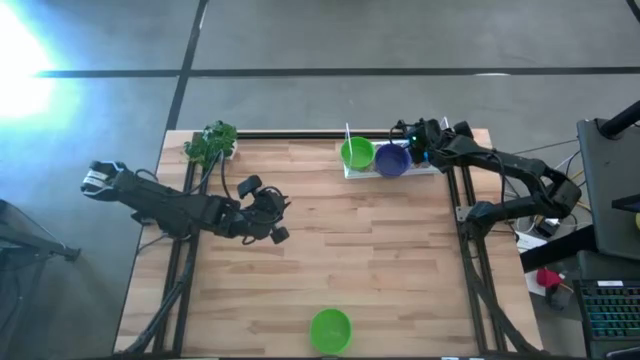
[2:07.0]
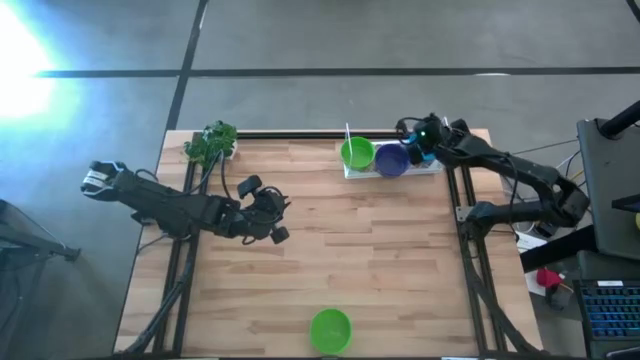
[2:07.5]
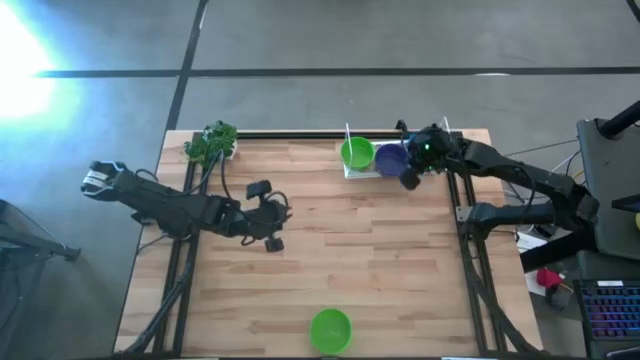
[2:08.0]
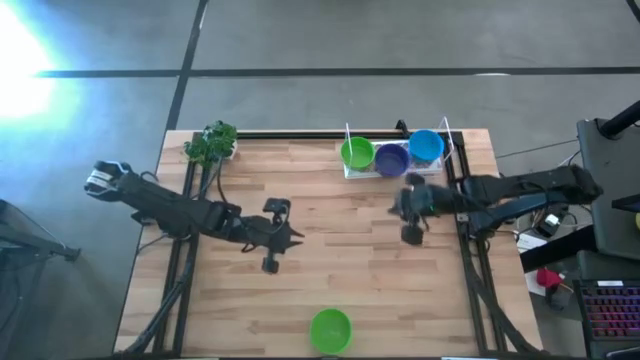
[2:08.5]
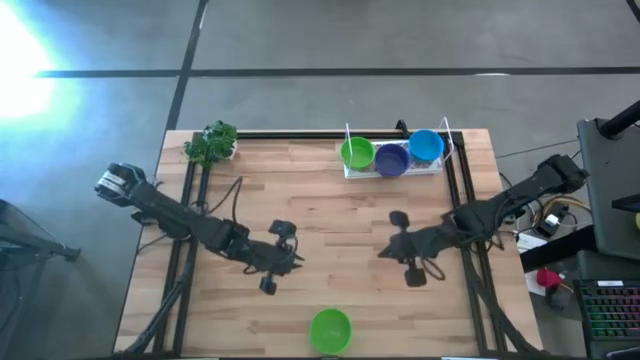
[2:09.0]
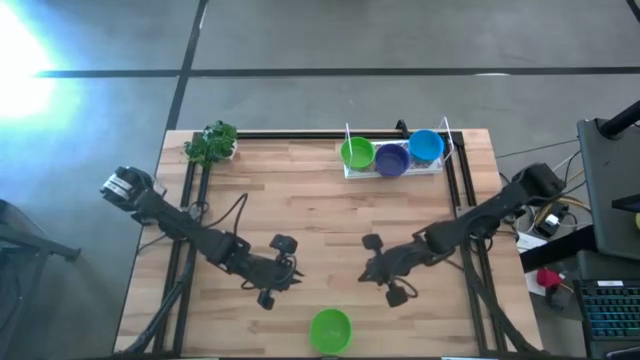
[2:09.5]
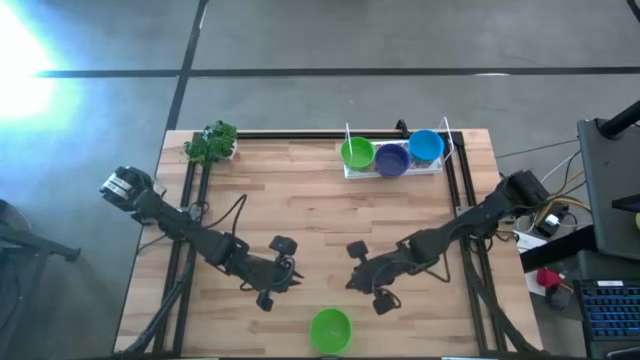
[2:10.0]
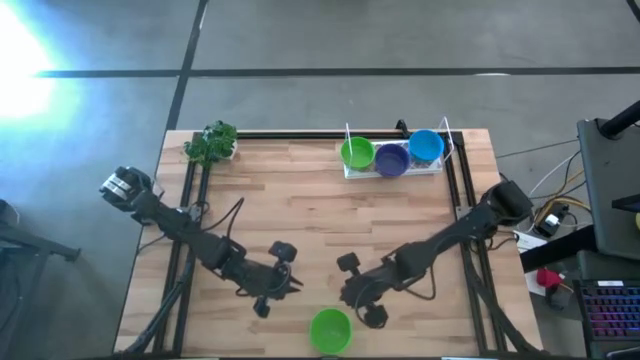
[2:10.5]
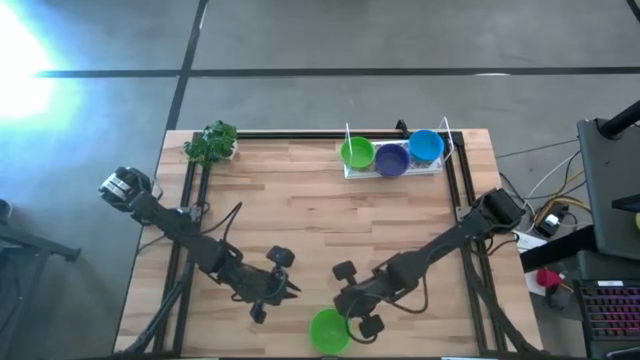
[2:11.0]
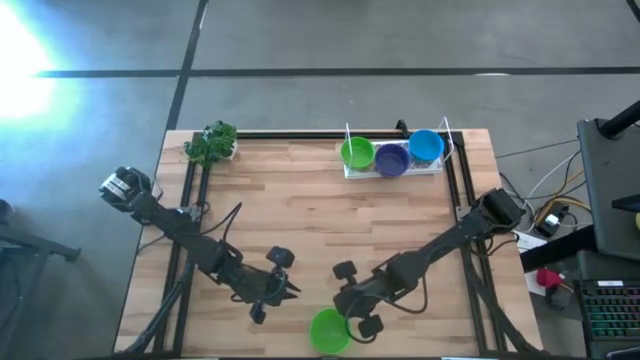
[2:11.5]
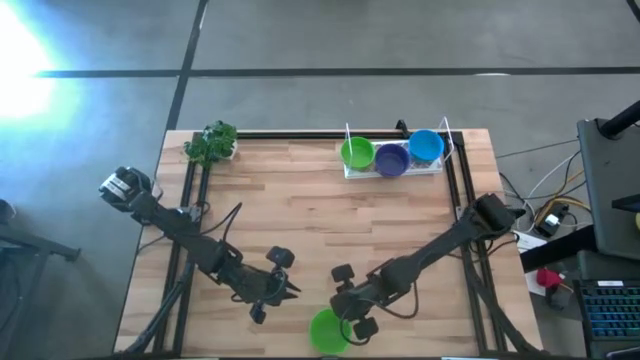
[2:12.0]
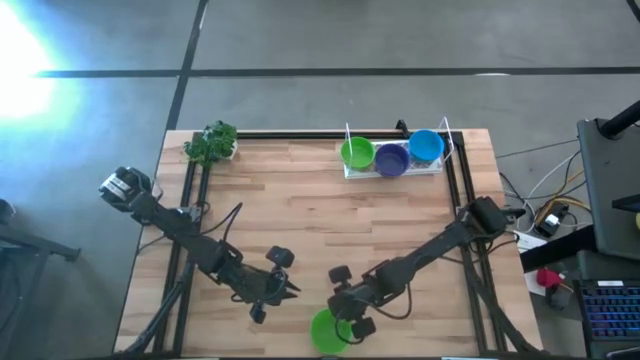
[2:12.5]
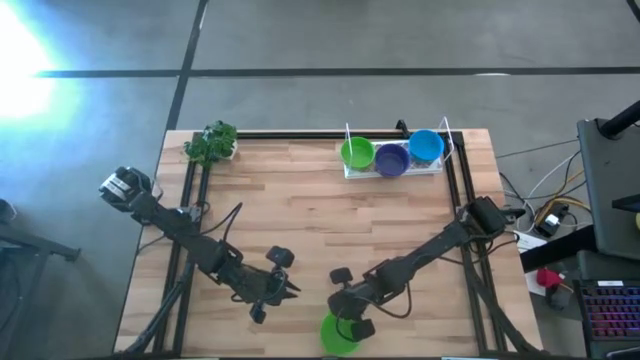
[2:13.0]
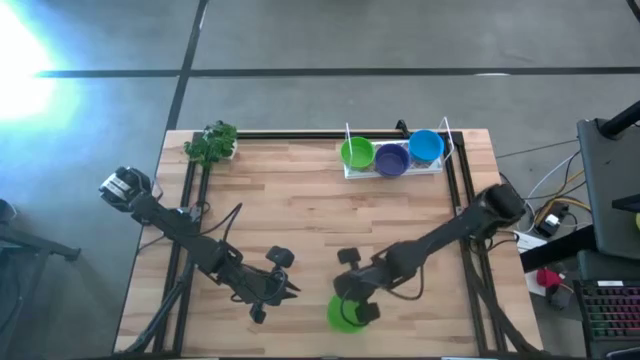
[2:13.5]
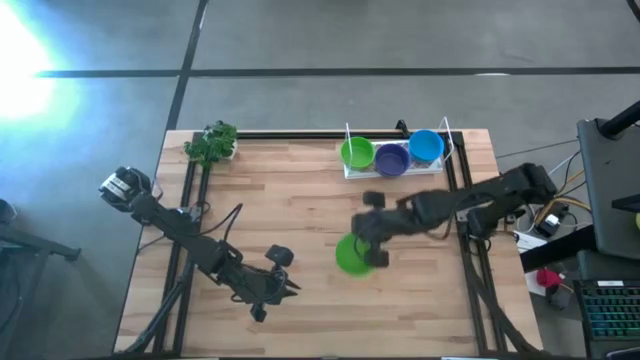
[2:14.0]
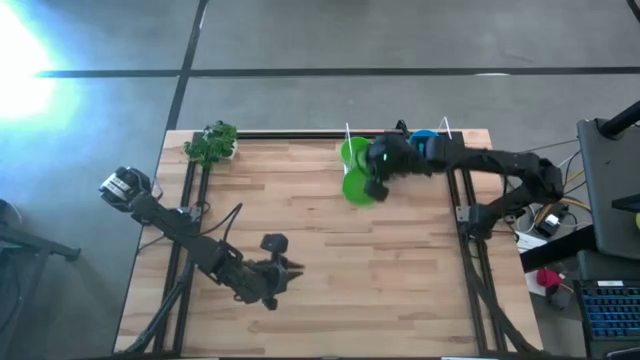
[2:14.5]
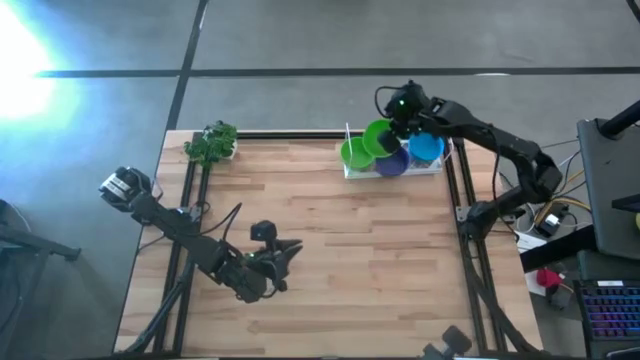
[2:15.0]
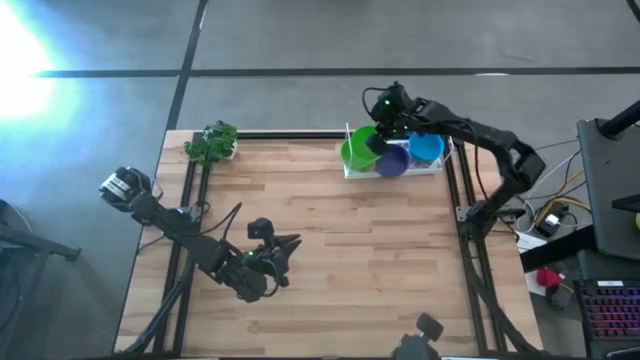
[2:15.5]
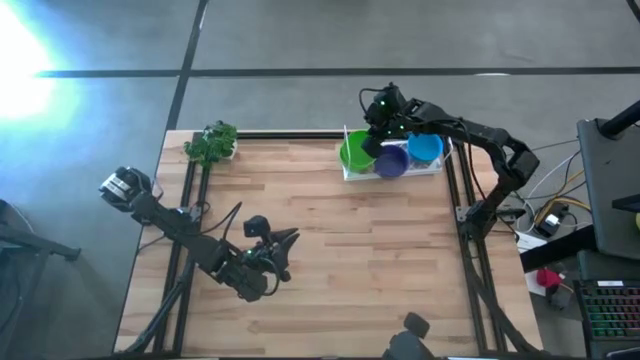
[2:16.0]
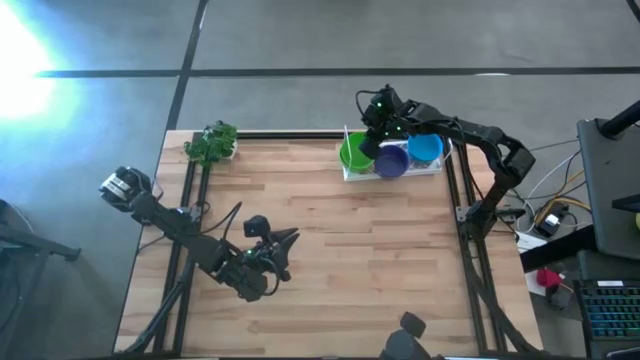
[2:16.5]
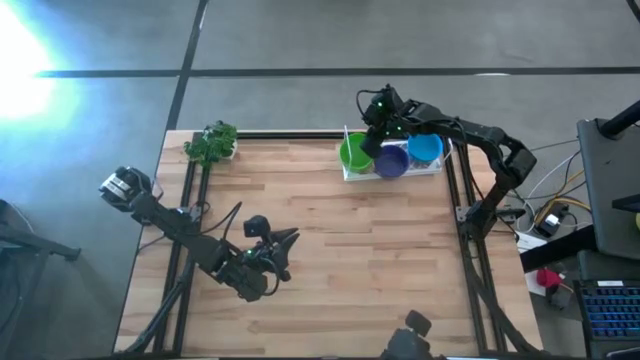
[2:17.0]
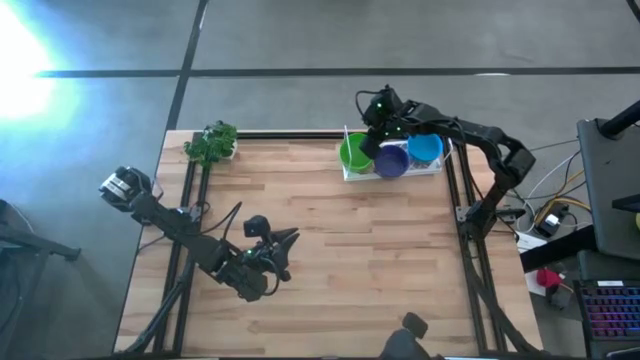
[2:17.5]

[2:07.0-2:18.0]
Task: Pick & Place Mini bowls
Stack the green bowl on top of the green bowl on the shelf

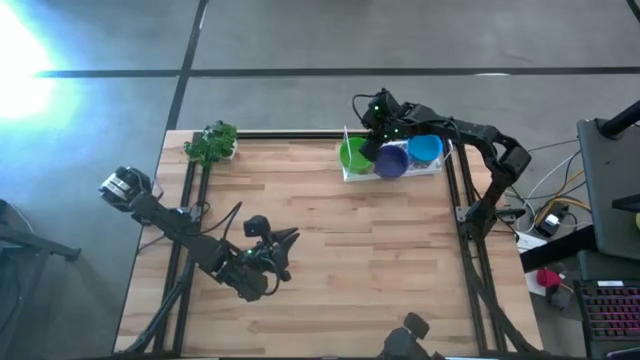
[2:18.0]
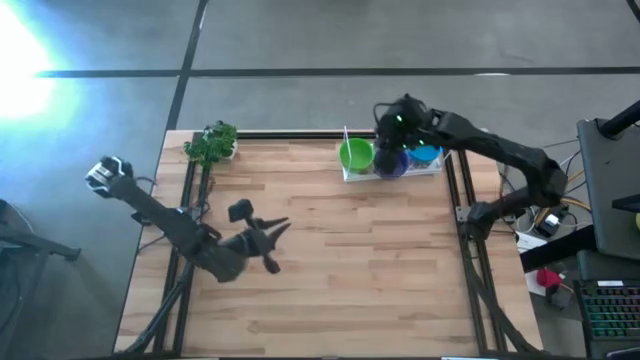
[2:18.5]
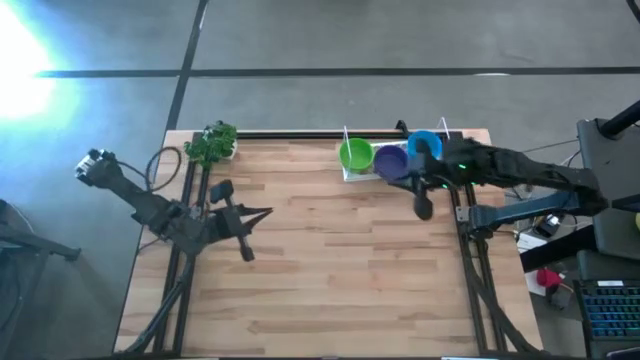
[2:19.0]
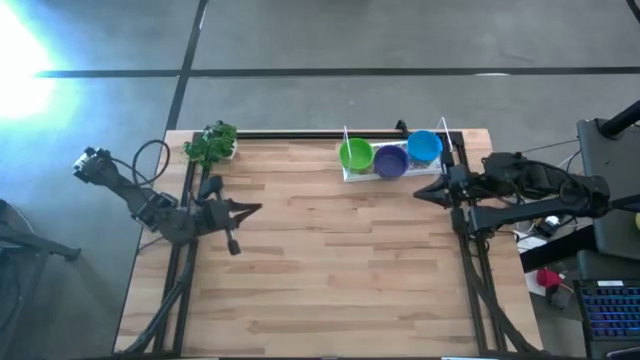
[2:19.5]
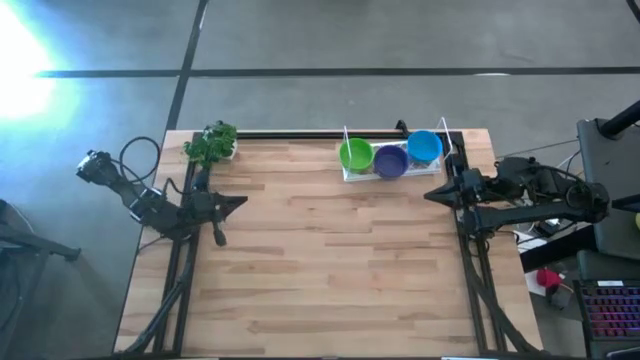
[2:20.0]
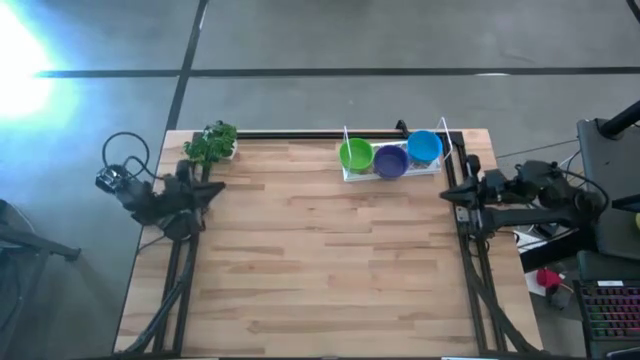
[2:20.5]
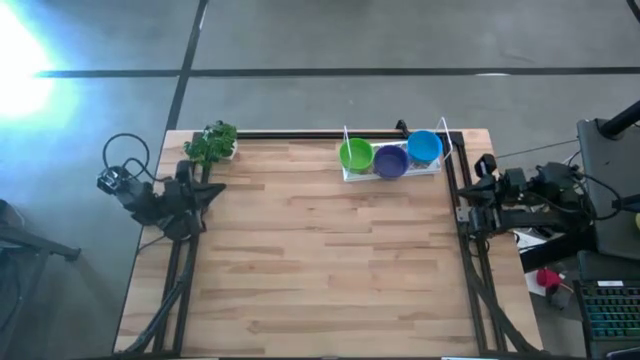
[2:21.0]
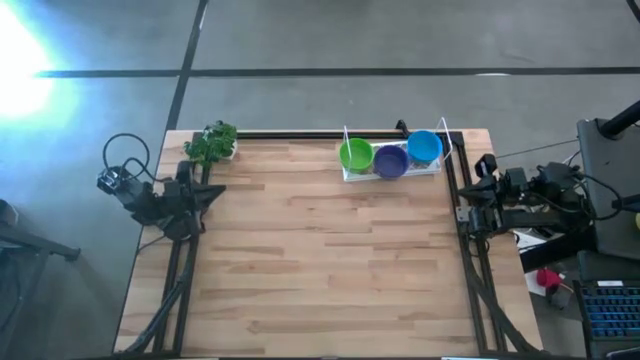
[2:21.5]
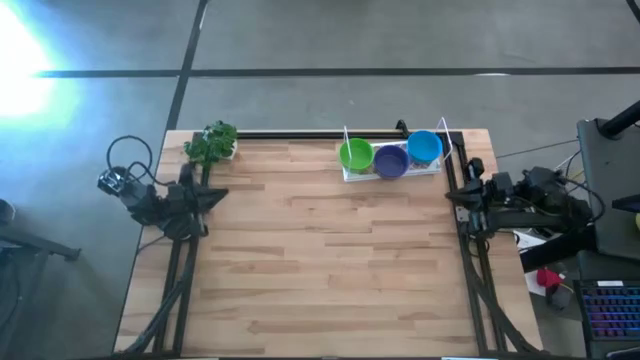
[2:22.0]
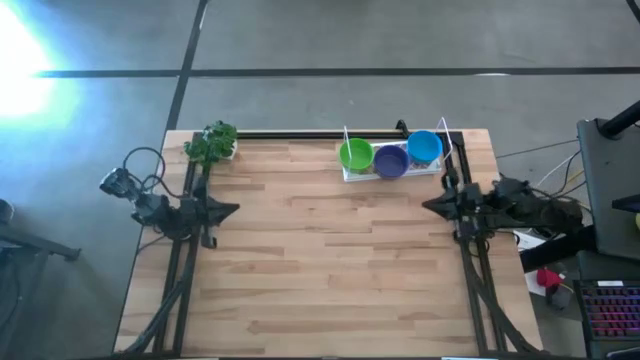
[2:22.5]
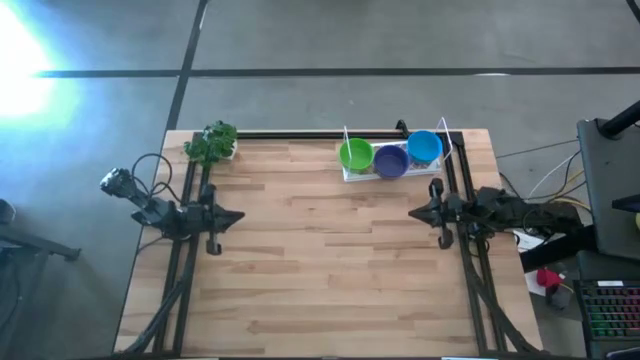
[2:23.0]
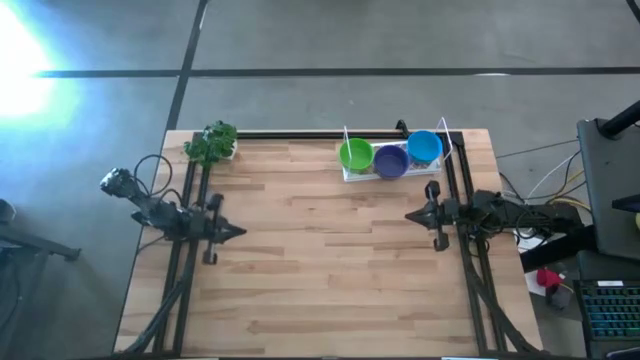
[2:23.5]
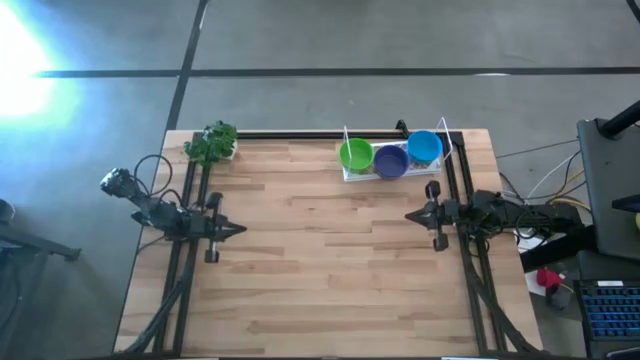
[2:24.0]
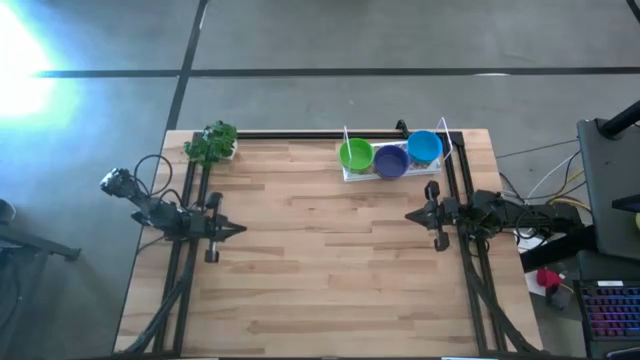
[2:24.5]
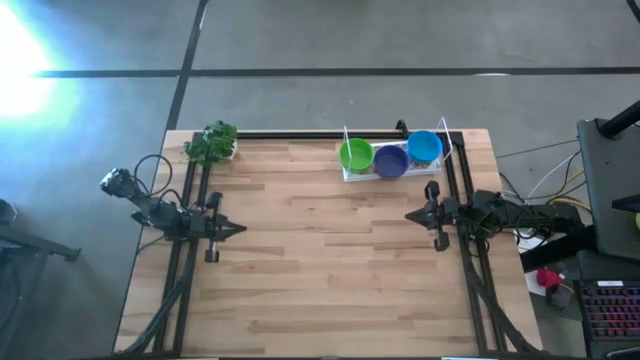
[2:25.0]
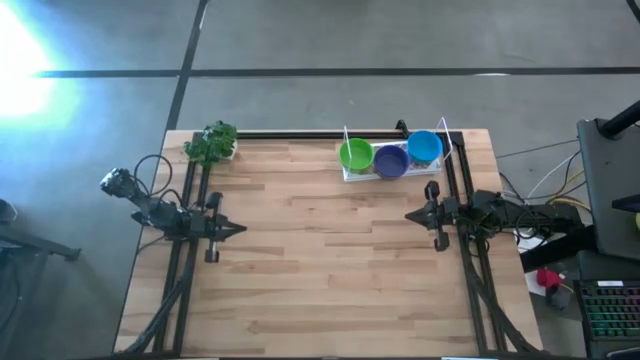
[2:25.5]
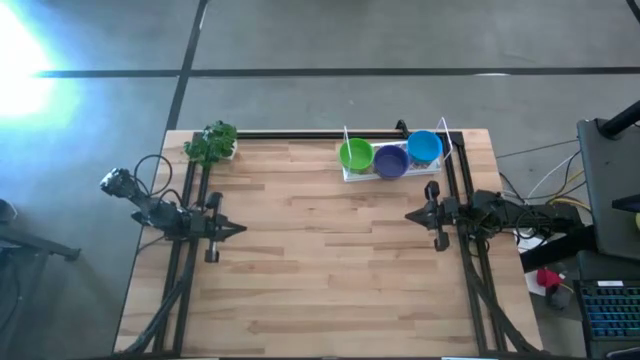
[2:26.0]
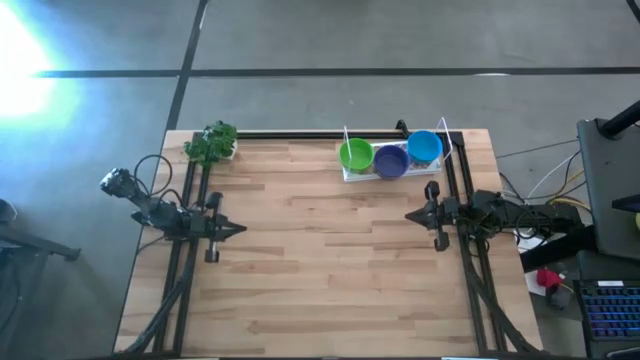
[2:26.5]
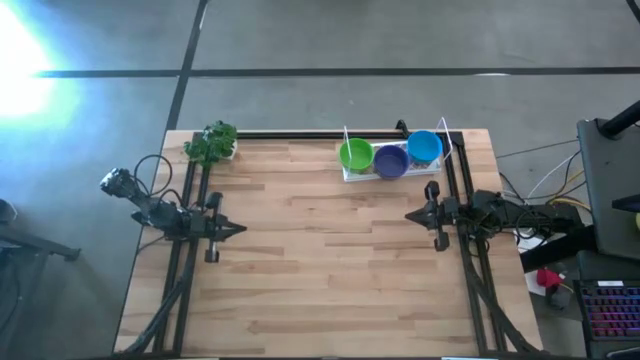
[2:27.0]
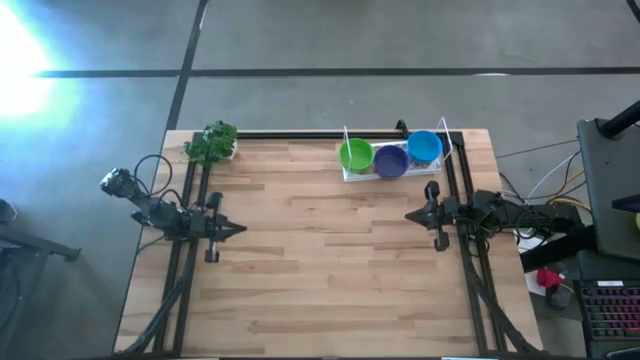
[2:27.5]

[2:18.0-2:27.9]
Return to Home Position
